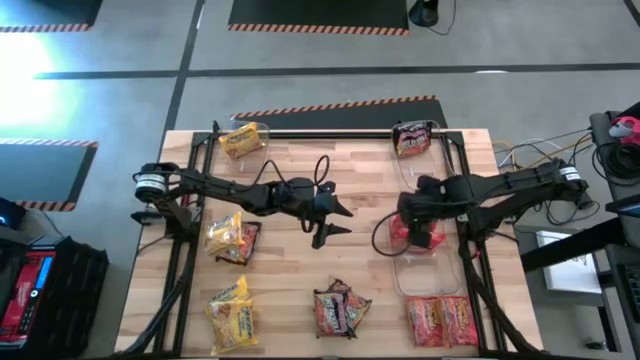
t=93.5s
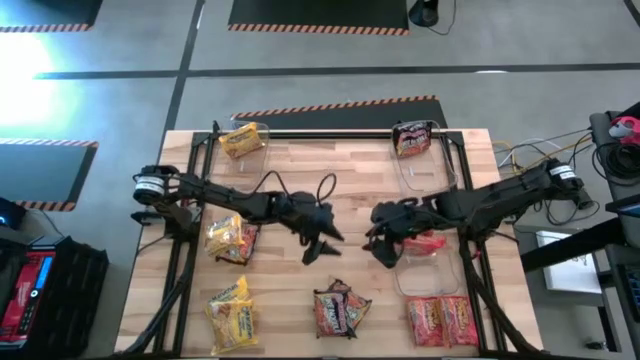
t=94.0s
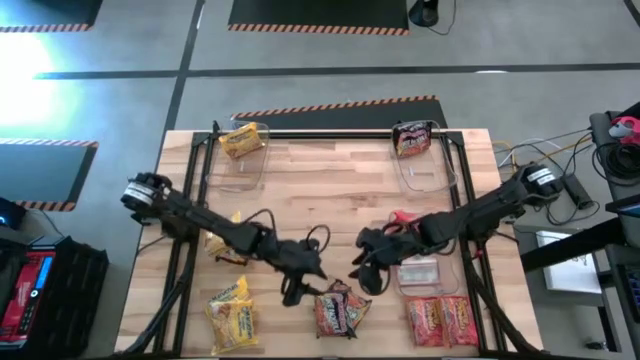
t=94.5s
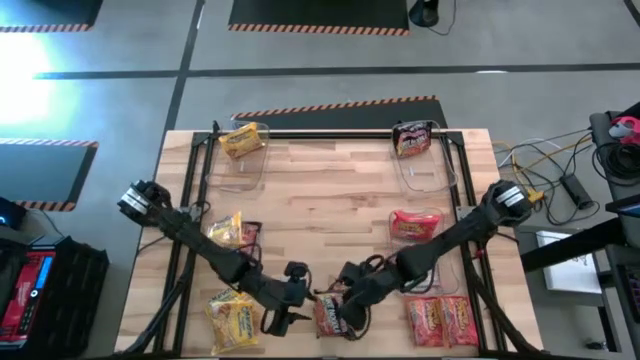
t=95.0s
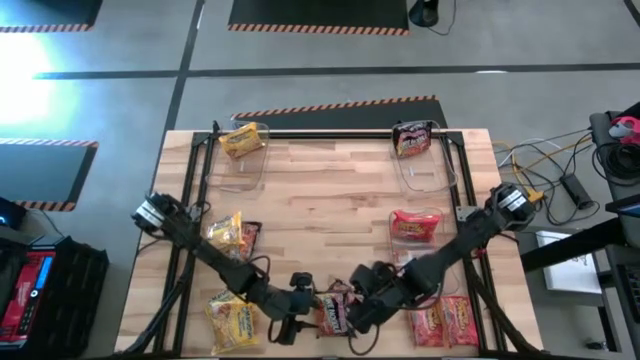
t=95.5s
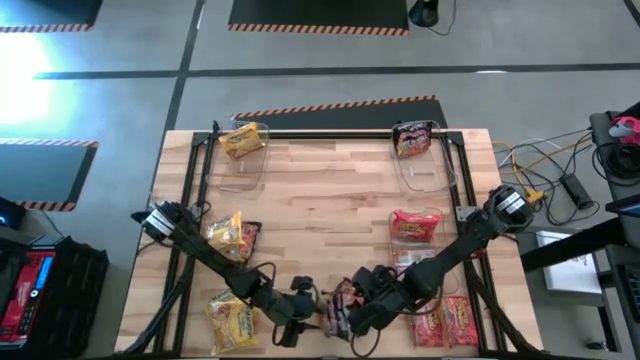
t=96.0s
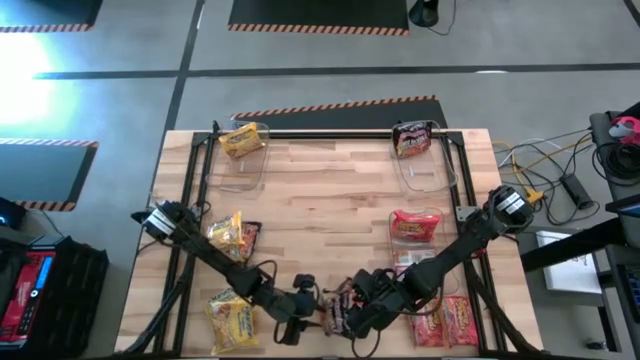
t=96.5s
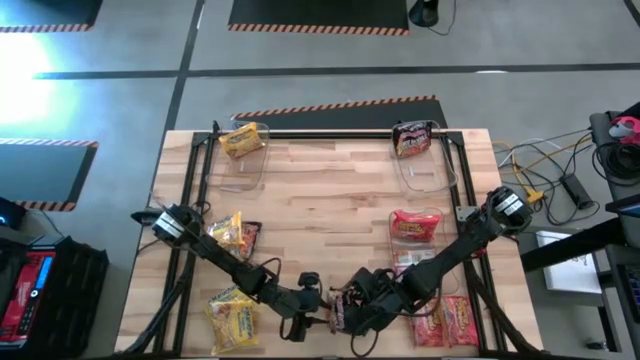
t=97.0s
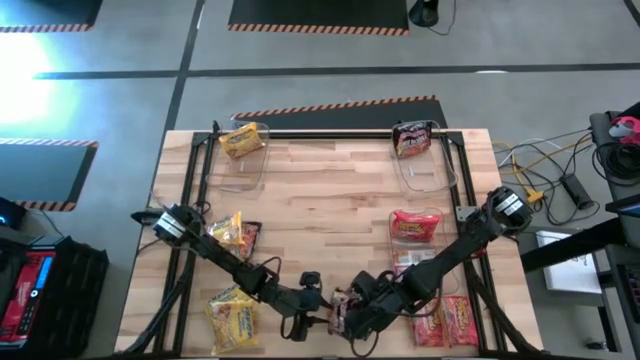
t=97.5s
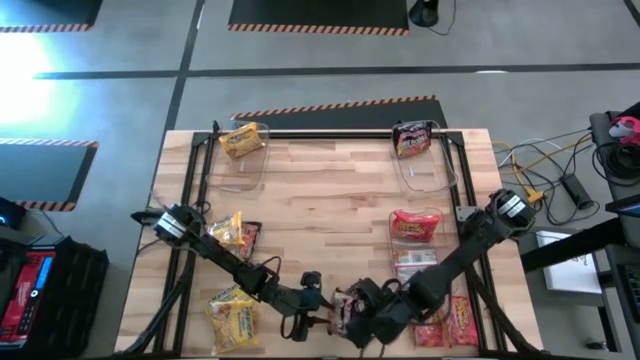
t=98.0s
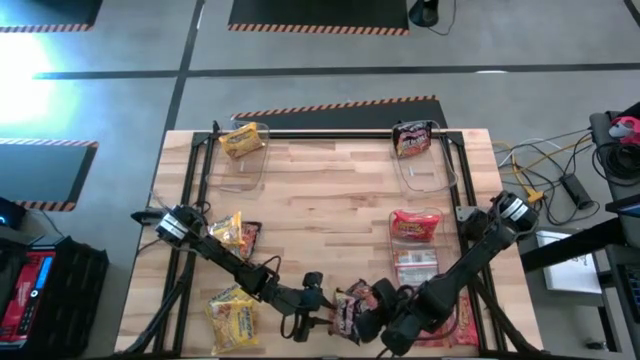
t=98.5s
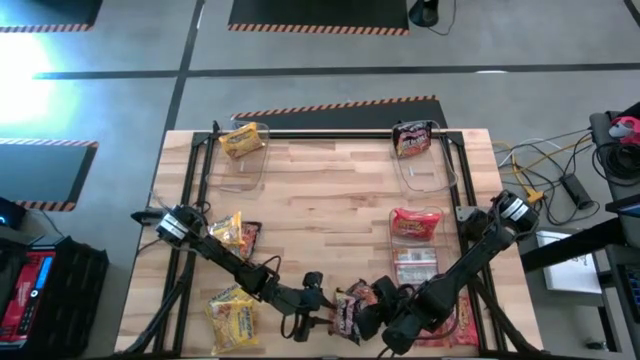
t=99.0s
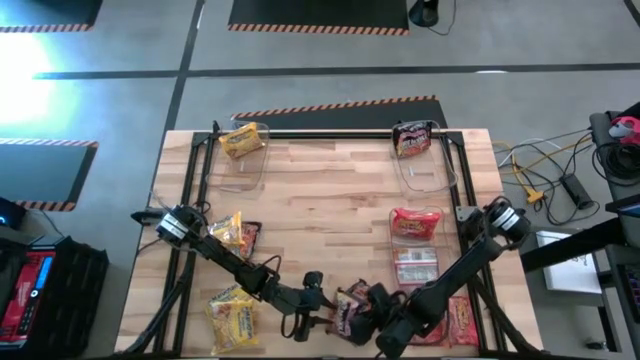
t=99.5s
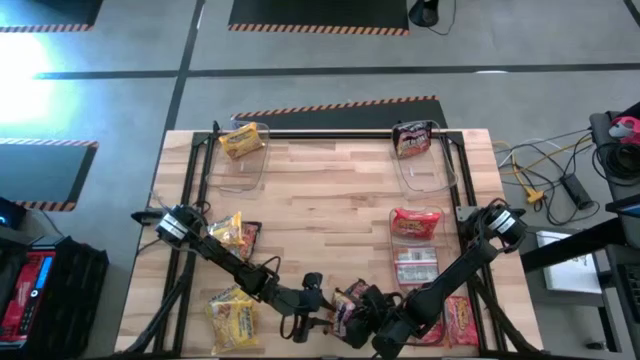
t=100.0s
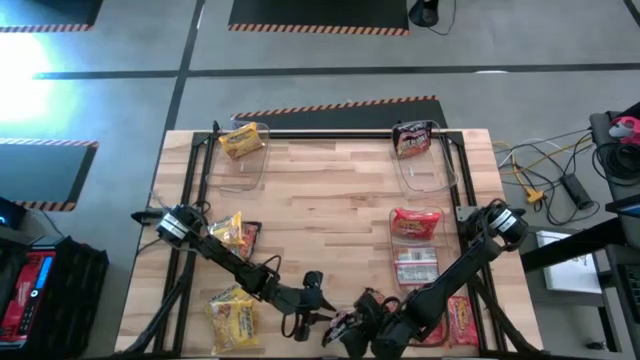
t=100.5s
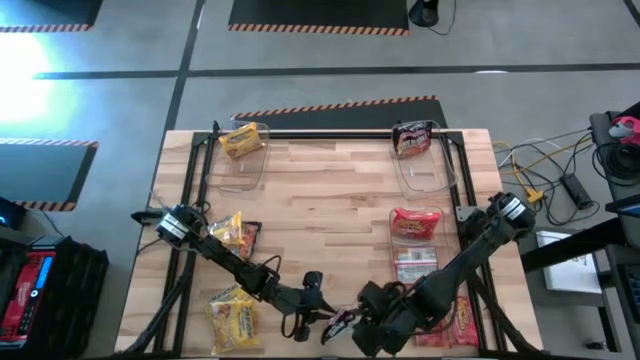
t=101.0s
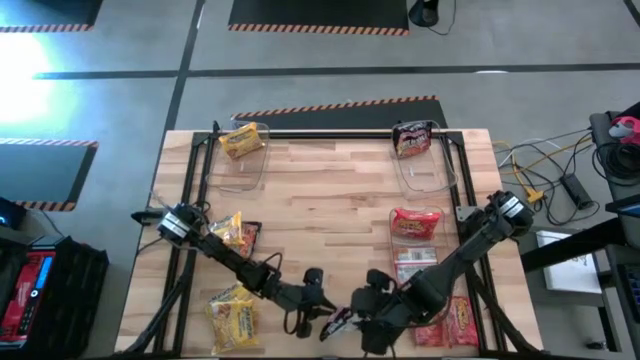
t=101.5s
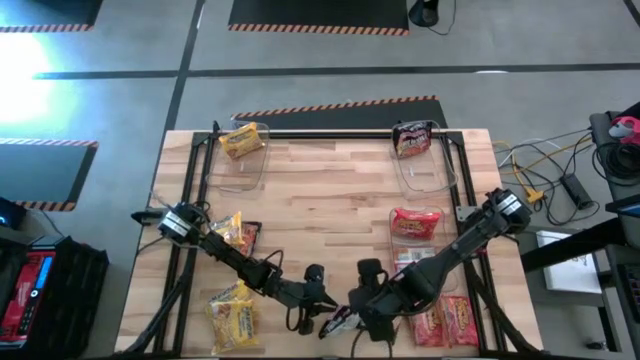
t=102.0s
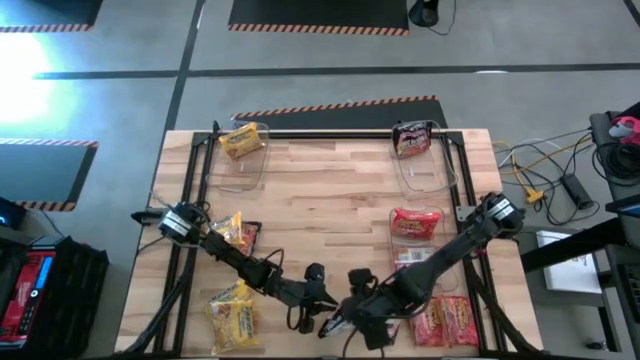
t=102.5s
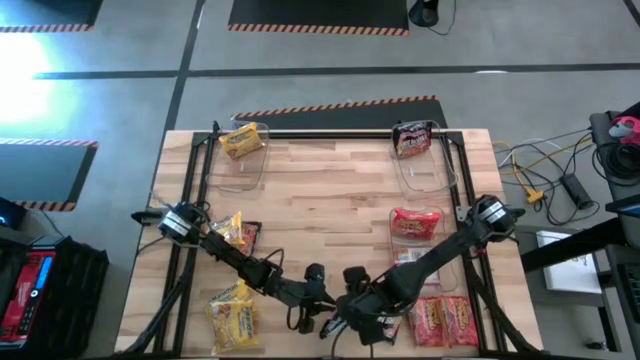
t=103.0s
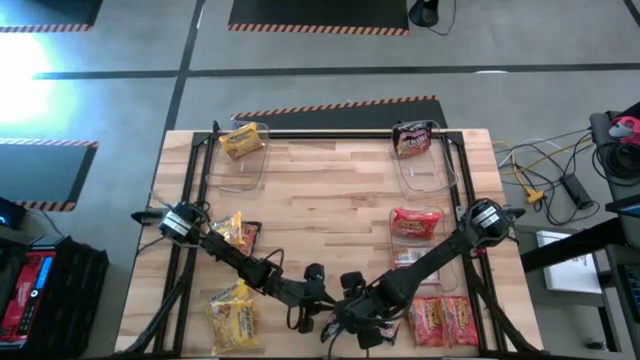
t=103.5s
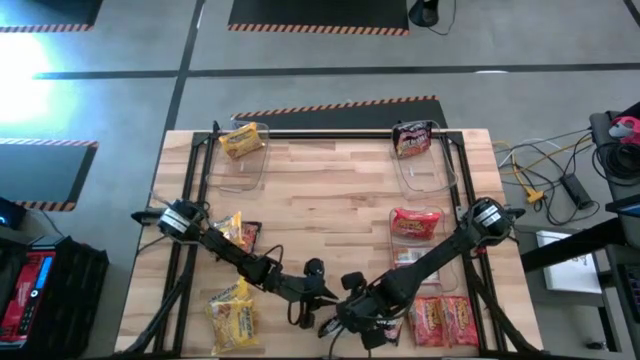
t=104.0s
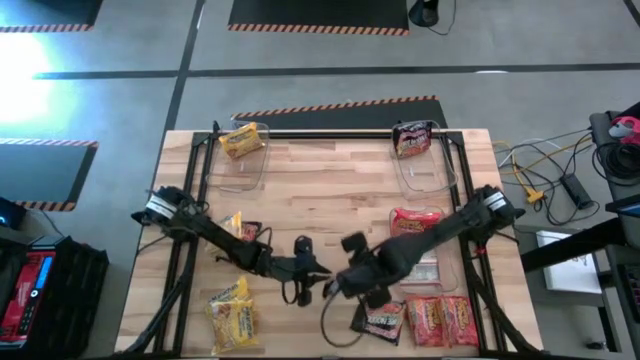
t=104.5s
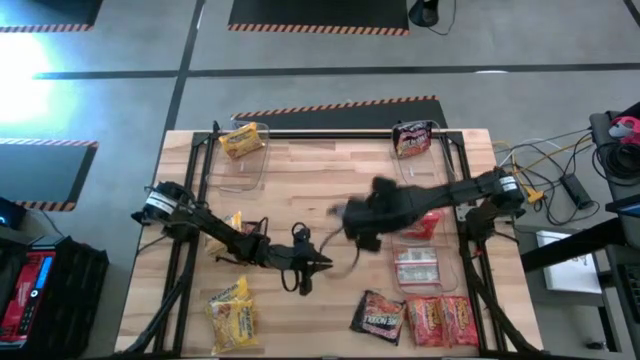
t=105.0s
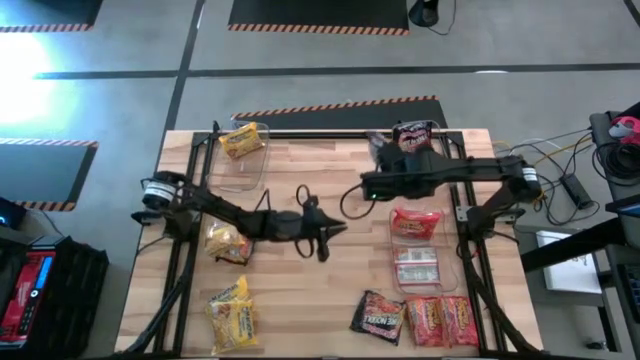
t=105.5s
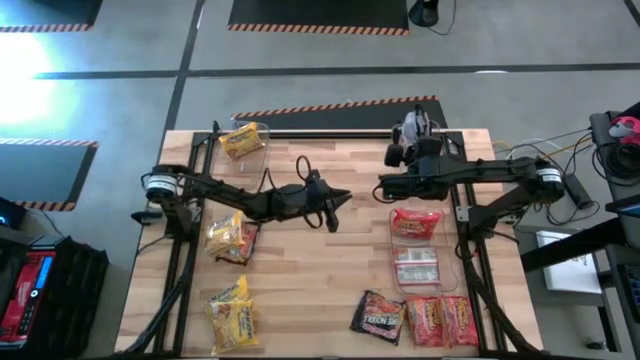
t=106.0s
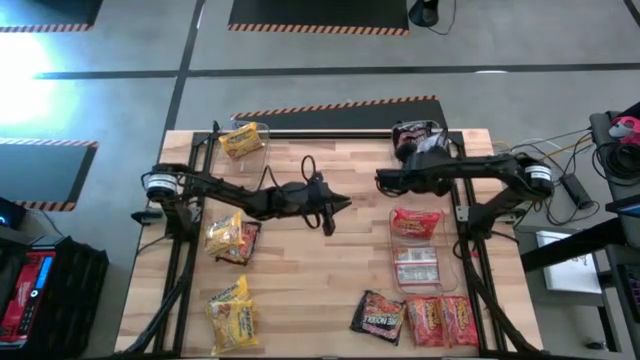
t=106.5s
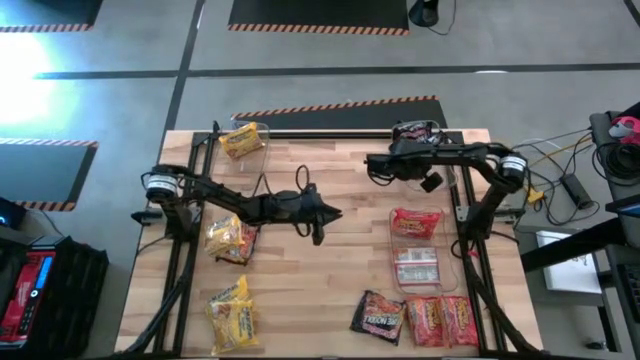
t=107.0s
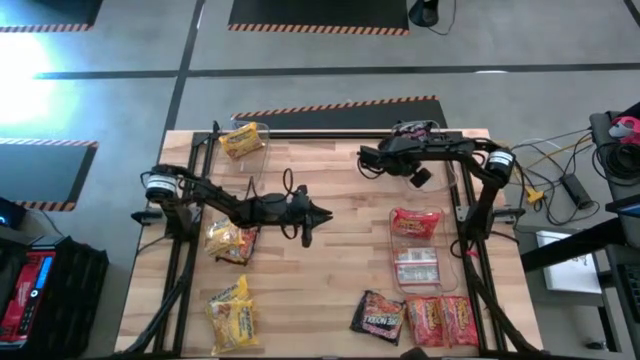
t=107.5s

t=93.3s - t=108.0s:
Task: Sort Maruchan noodles
Put the black noodle pack into the top right transparent bin

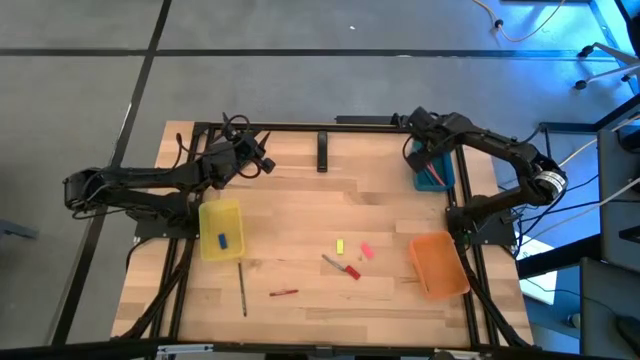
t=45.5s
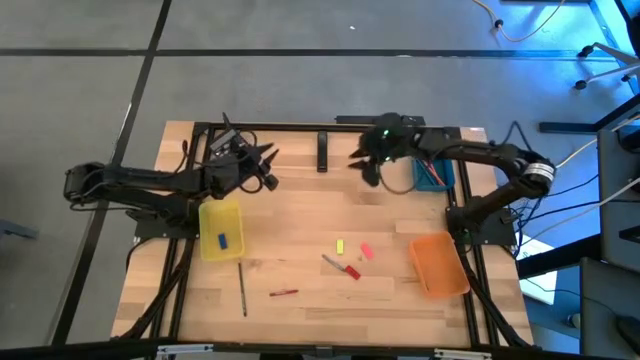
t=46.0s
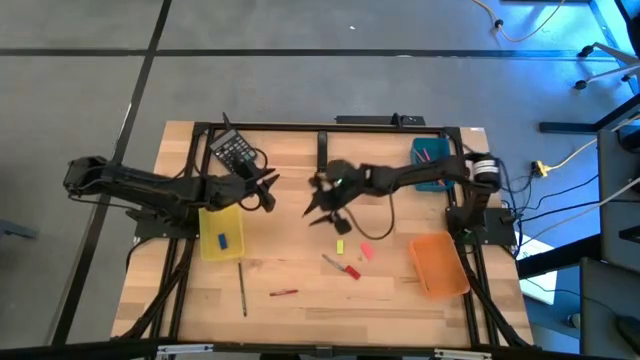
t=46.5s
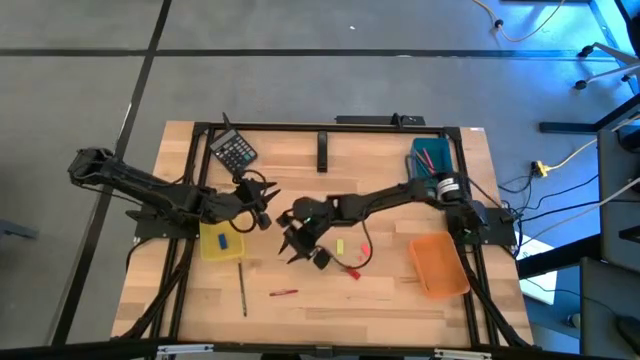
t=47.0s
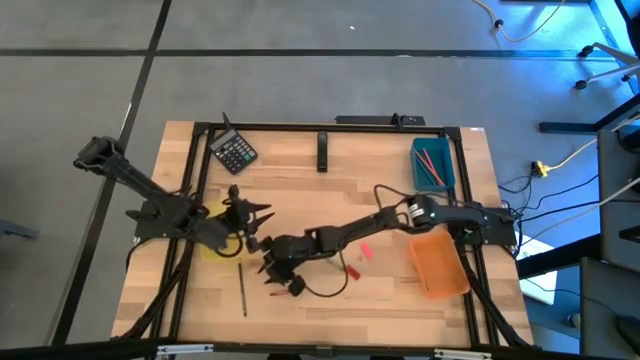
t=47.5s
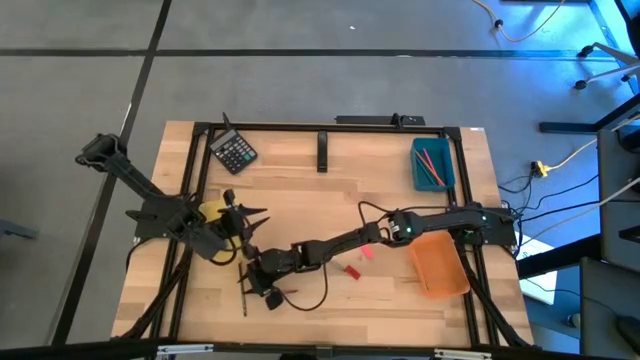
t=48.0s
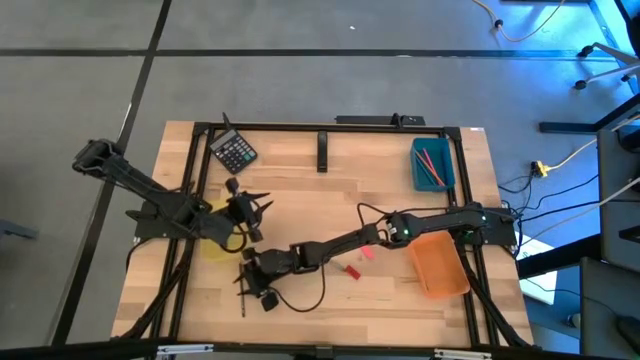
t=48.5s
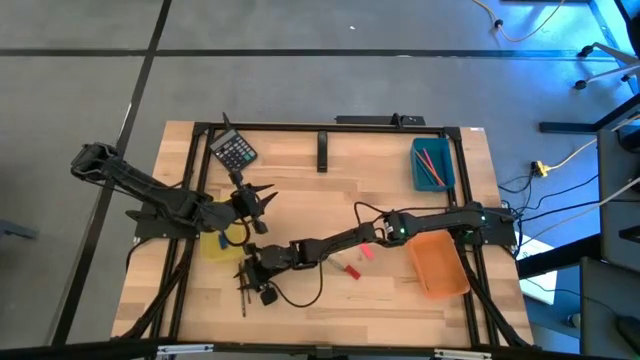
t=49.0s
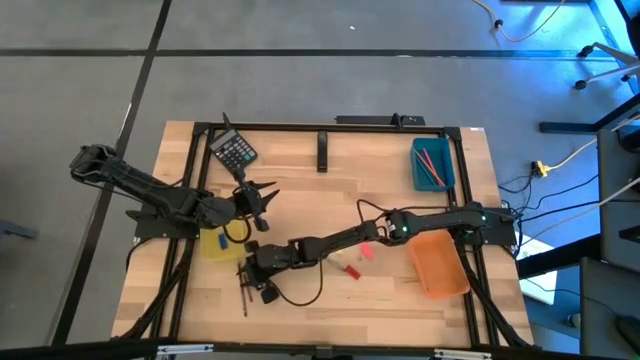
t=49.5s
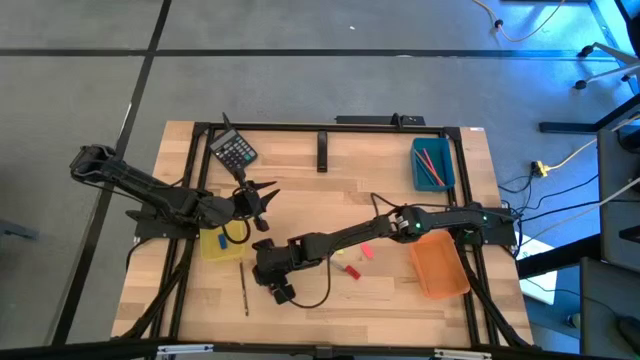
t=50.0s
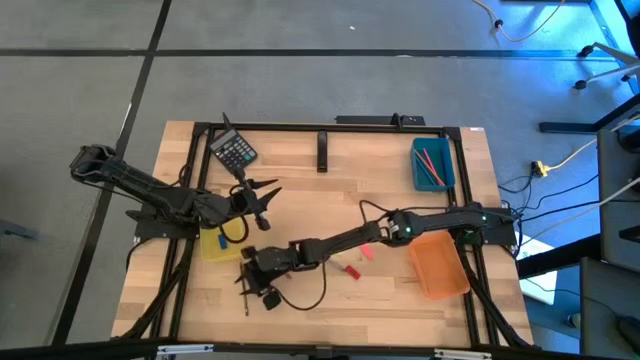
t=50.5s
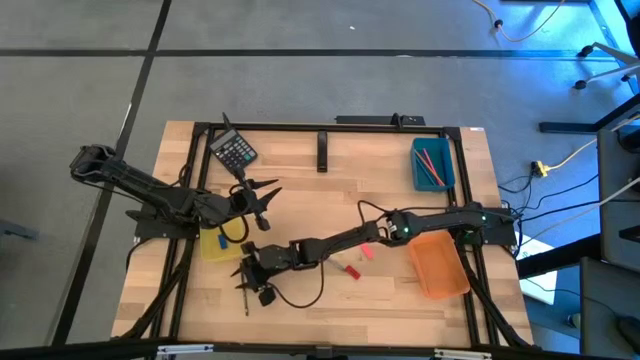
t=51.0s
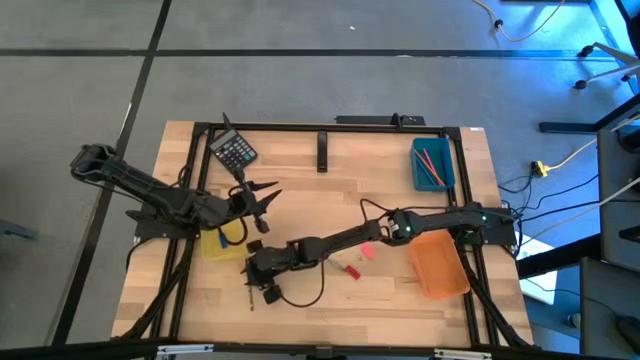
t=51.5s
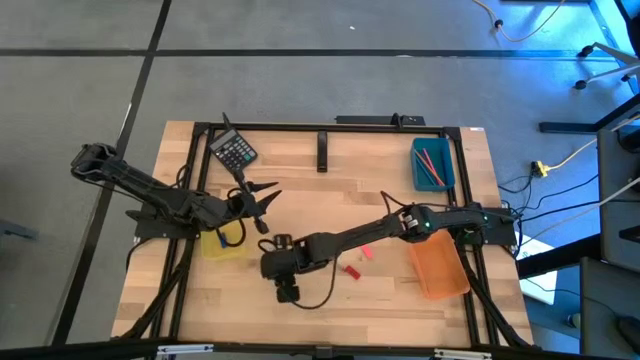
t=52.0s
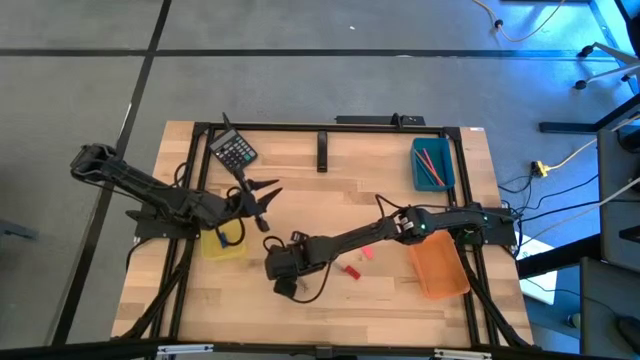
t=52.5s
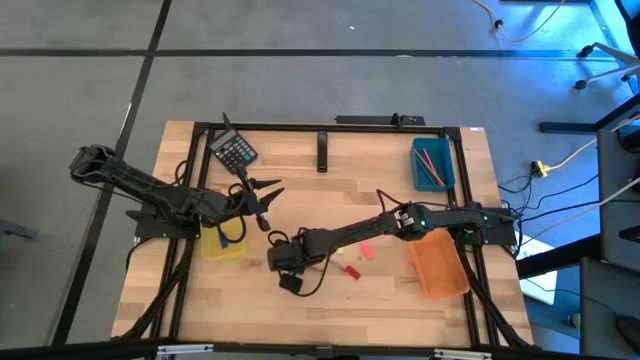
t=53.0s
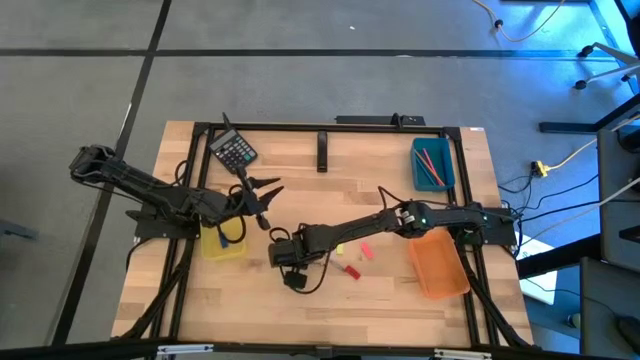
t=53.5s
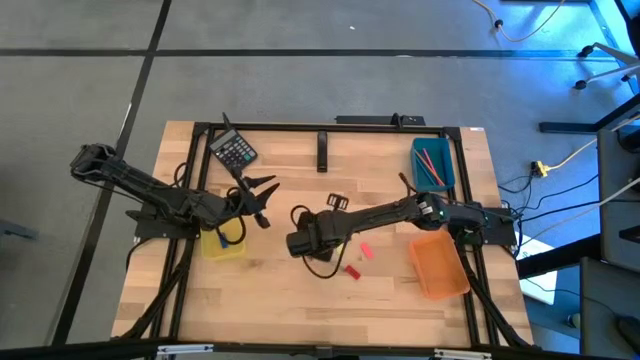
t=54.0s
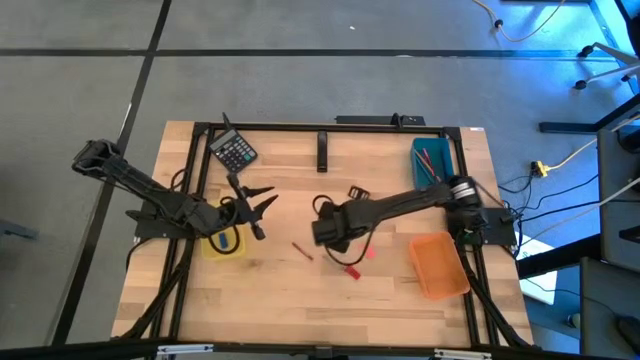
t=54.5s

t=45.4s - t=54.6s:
Task: Sort crayons/erasers/pens/pencils in bins
Put the dark blue pencil into the blue bin
